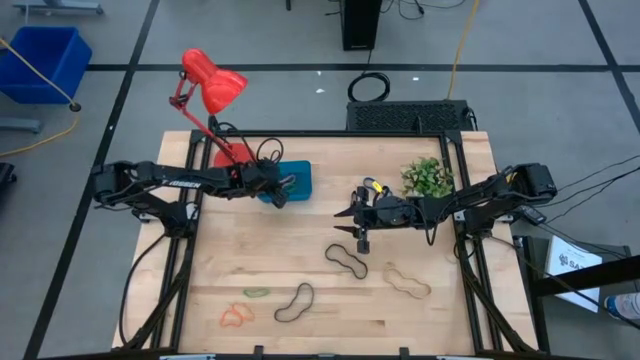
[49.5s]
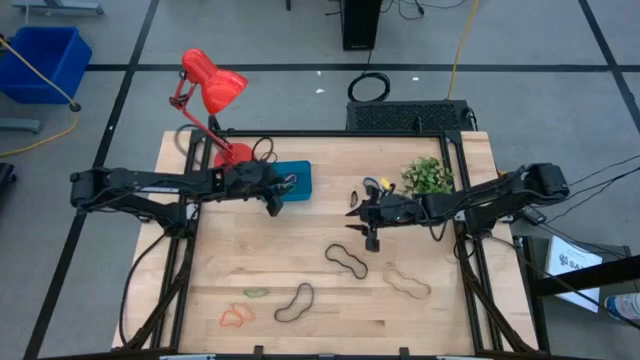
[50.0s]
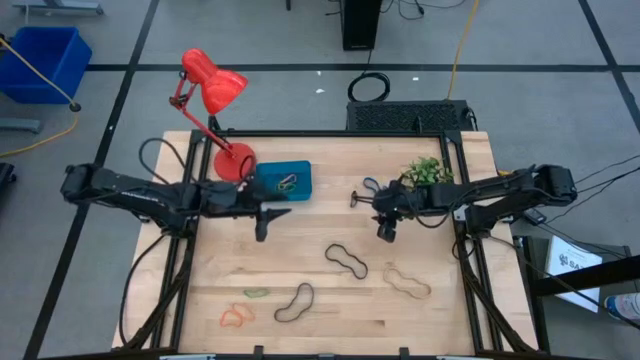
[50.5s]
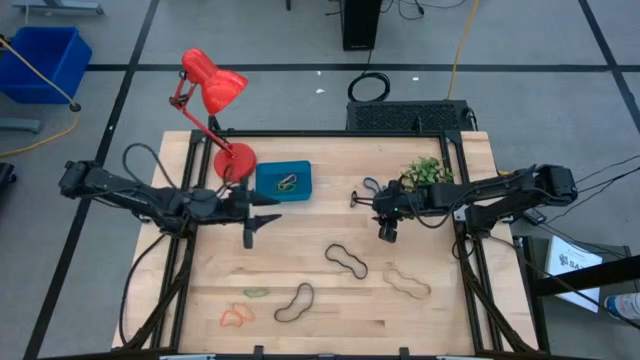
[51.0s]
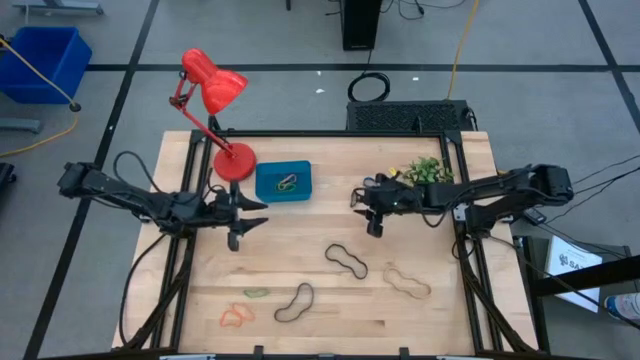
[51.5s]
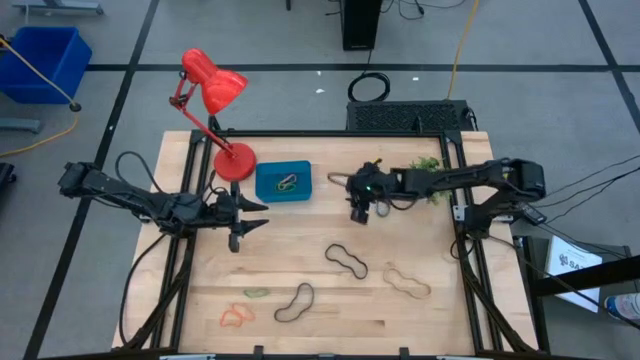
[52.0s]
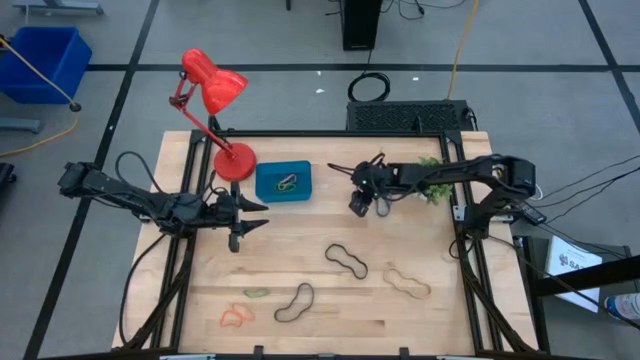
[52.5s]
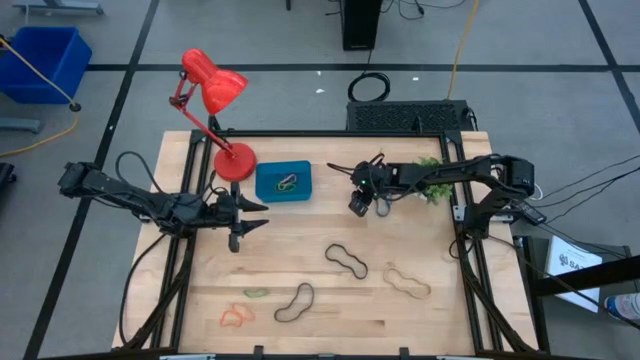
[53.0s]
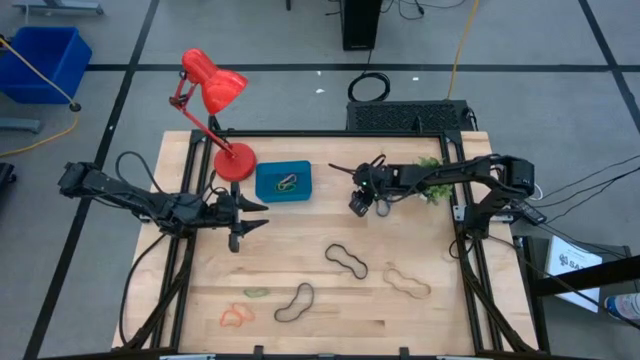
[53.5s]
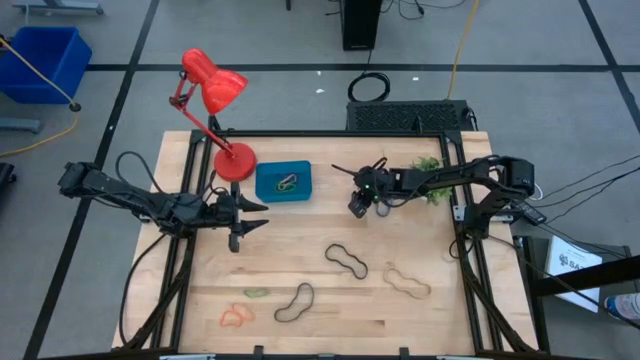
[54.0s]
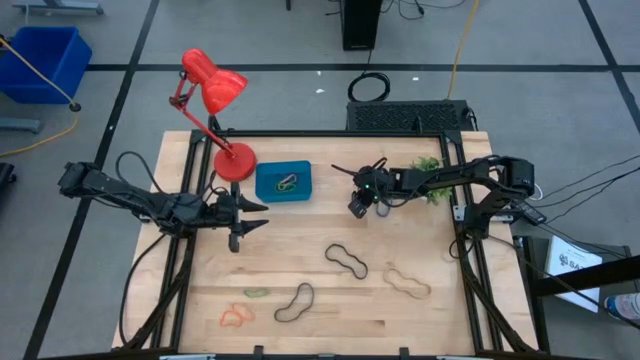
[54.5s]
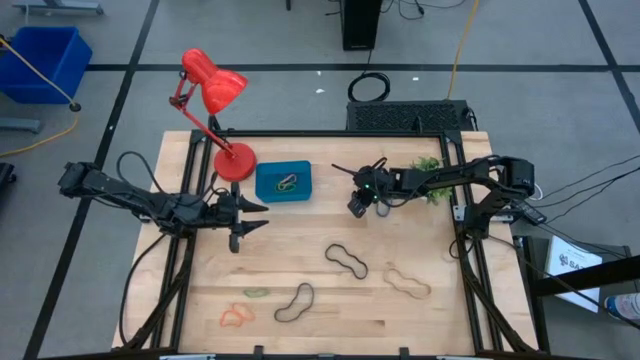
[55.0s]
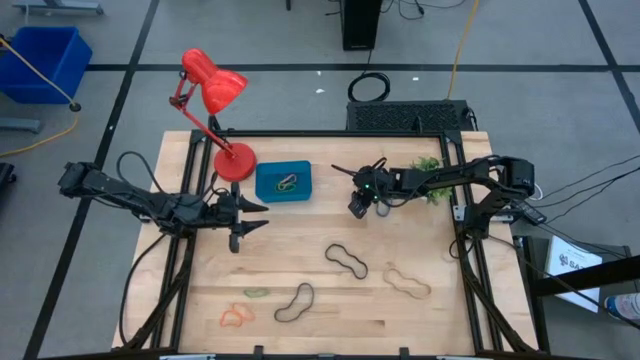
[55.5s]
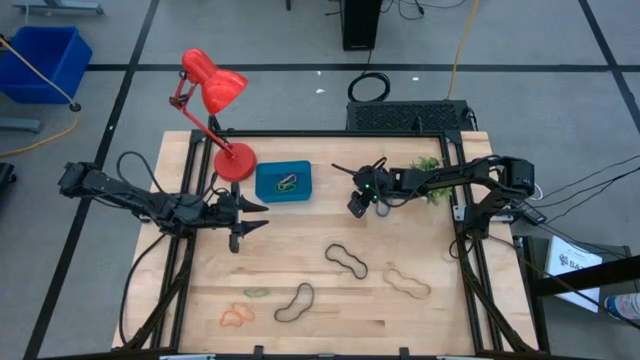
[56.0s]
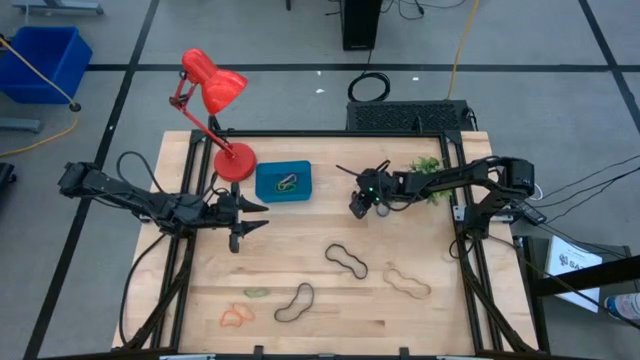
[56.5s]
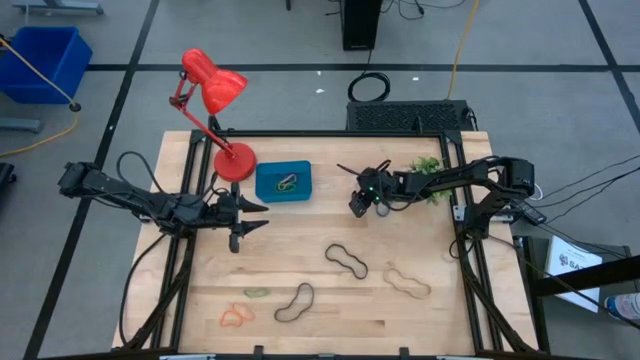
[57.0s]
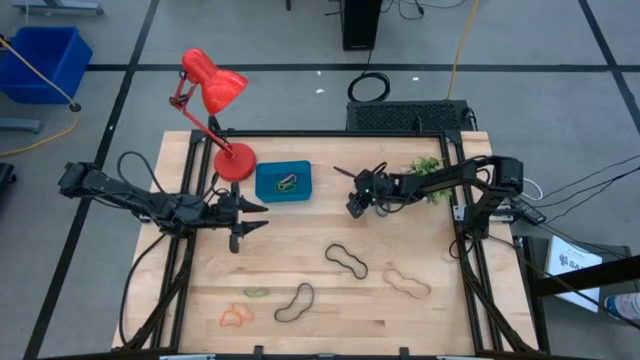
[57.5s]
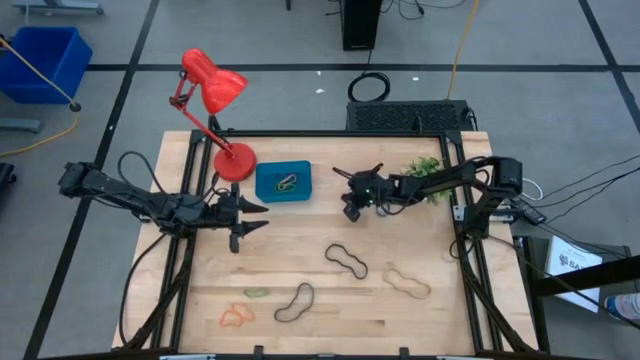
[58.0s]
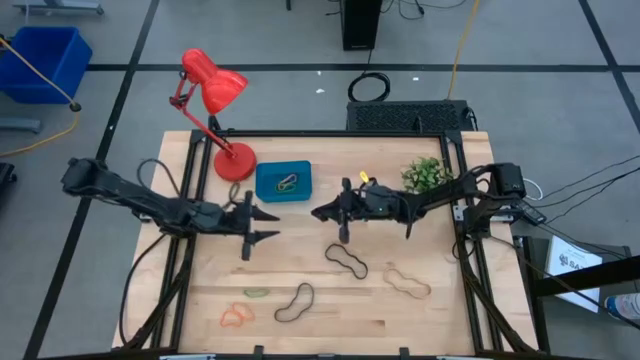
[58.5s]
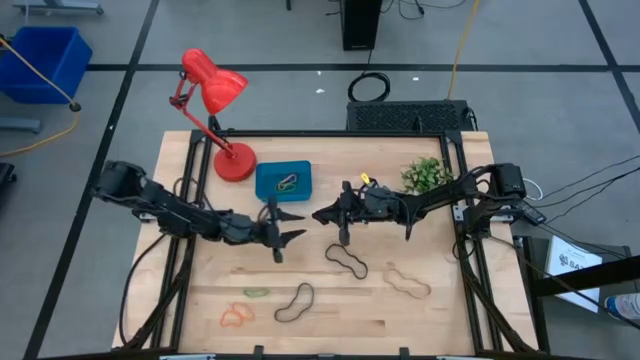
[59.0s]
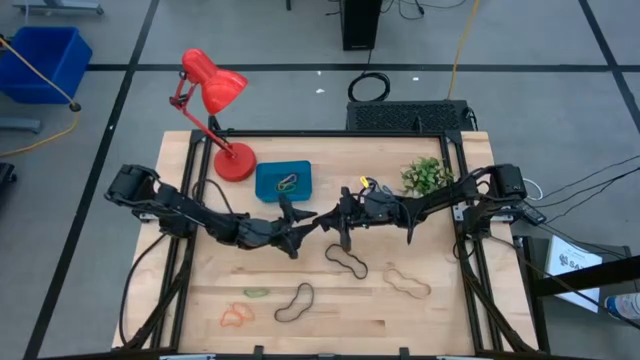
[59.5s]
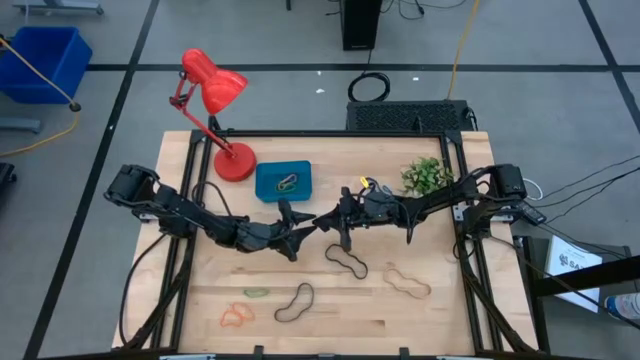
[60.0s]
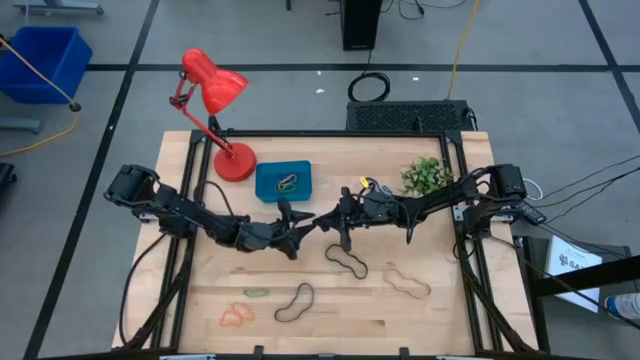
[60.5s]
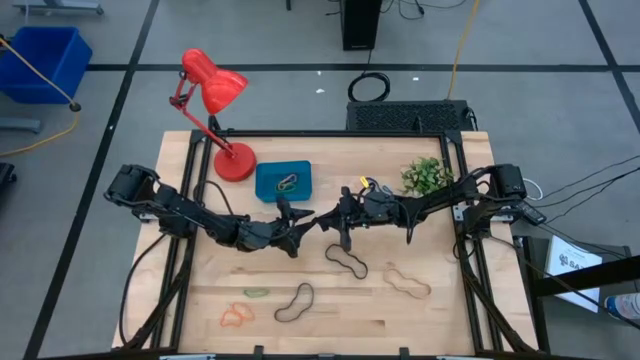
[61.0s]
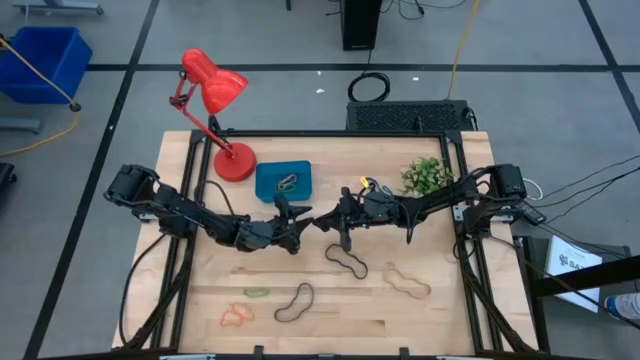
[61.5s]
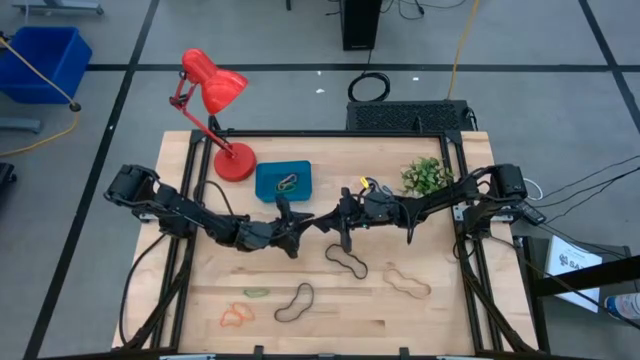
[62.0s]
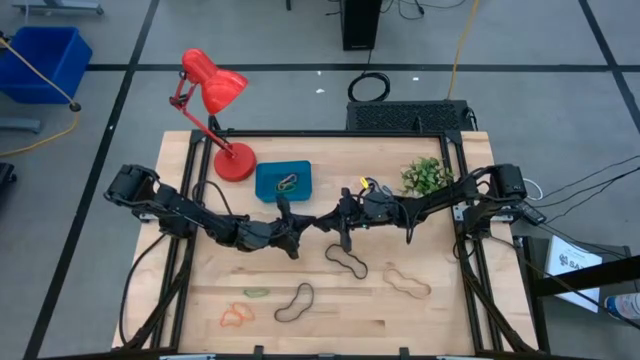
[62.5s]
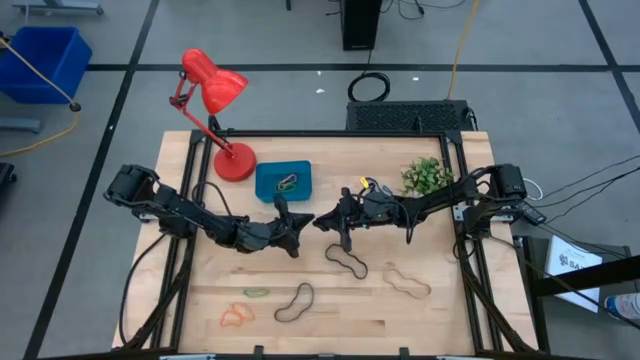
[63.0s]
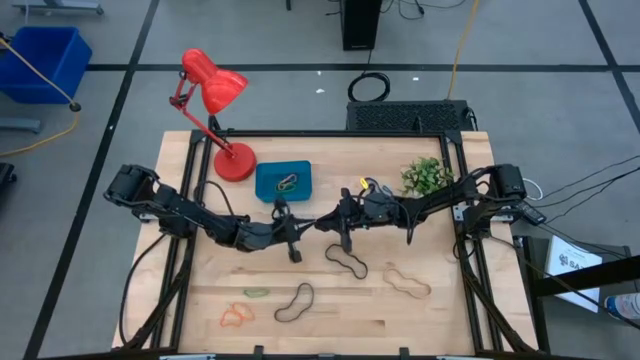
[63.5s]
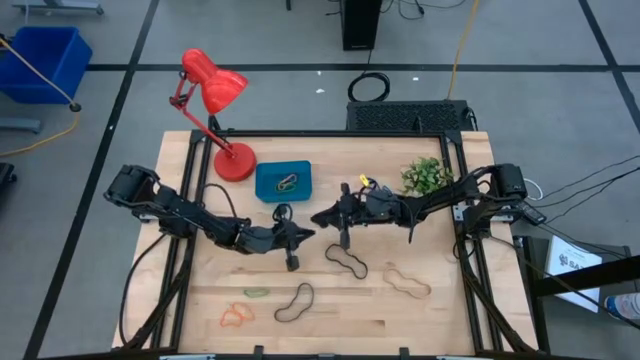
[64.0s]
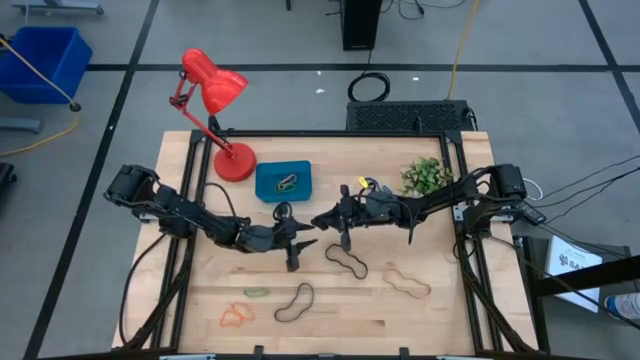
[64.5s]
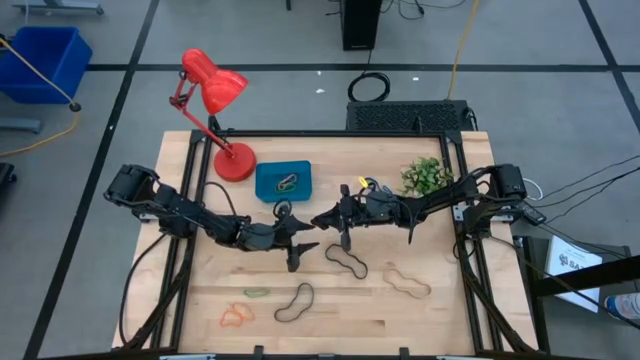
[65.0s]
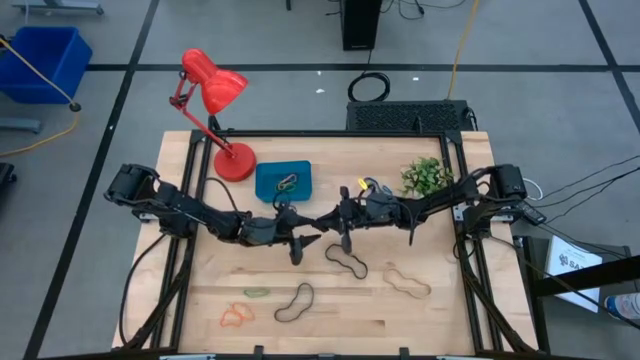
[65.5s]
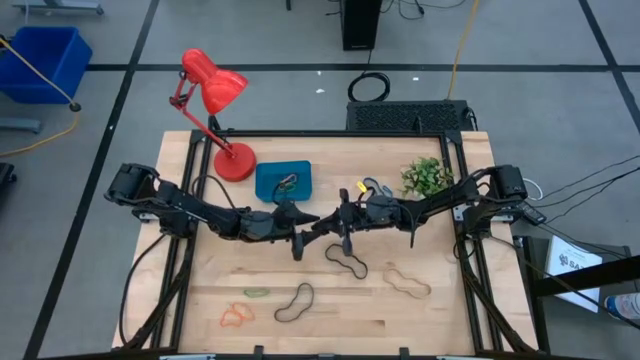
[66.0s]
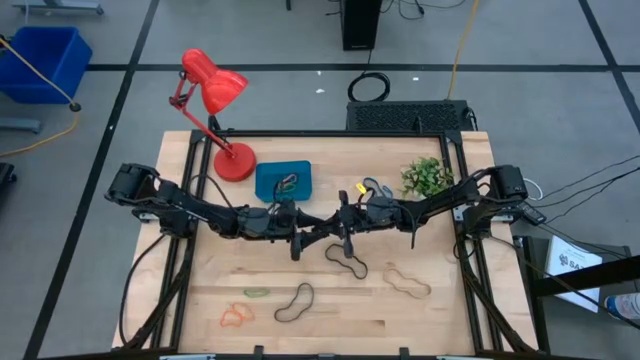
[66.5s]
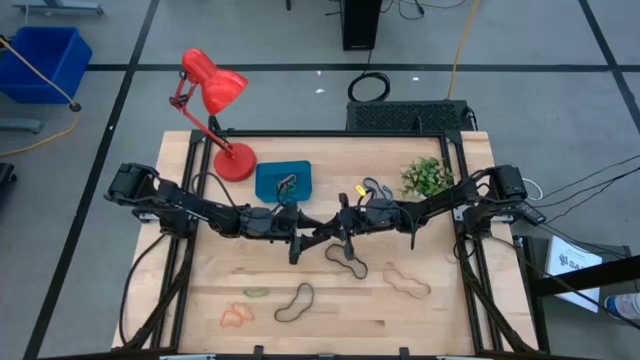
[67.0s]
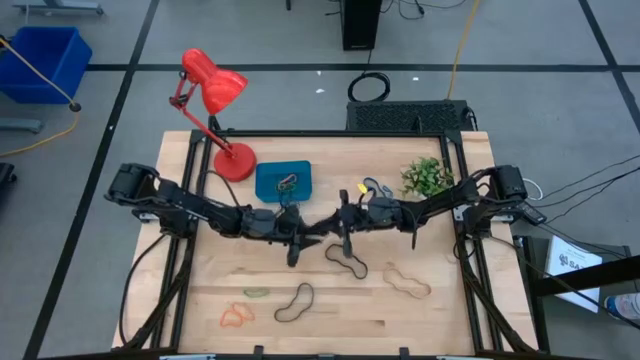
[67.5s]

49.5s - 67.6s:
Task: Pick and place rubber bands into bin
Put the black rubber band into the blue bin

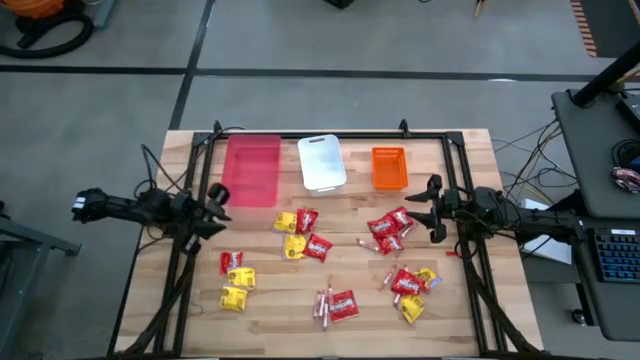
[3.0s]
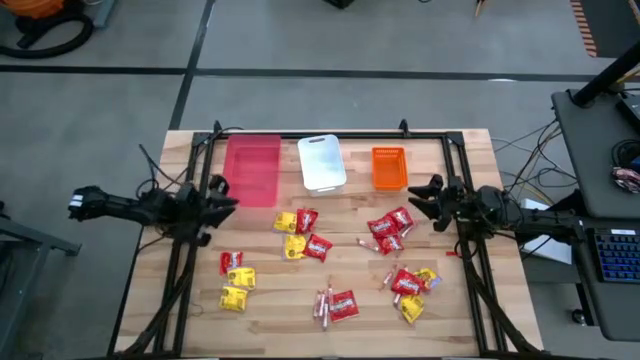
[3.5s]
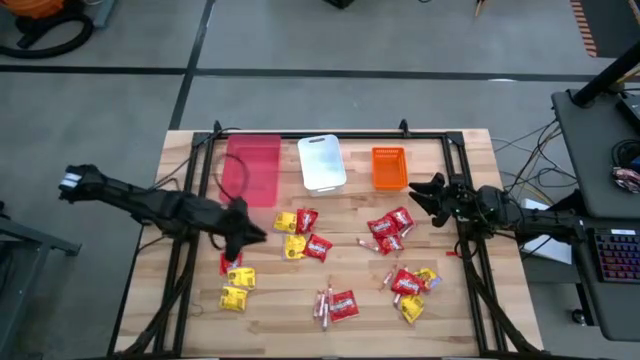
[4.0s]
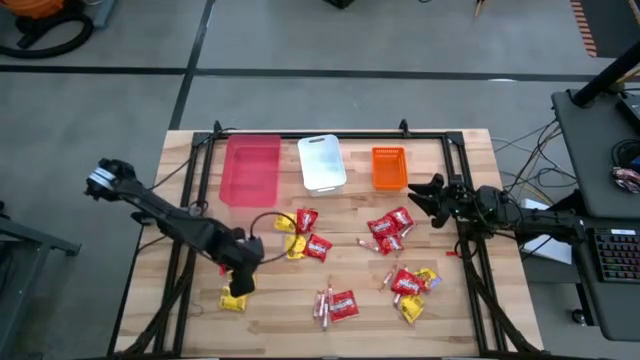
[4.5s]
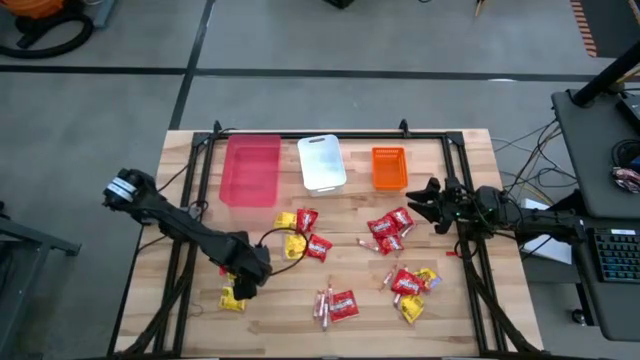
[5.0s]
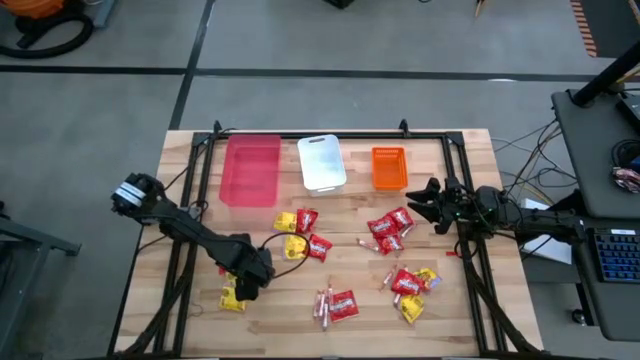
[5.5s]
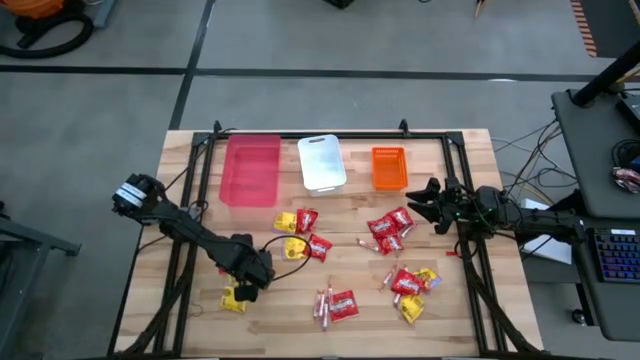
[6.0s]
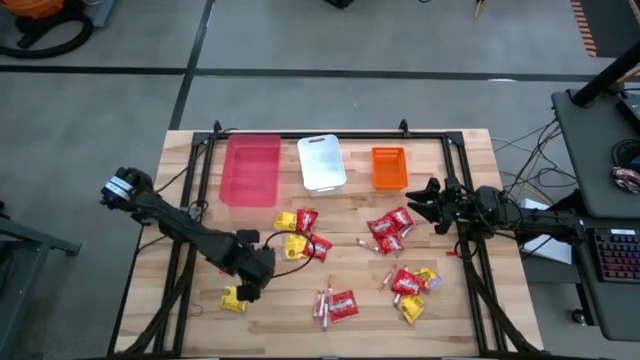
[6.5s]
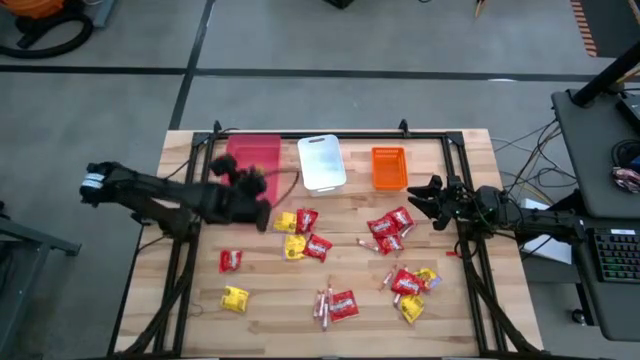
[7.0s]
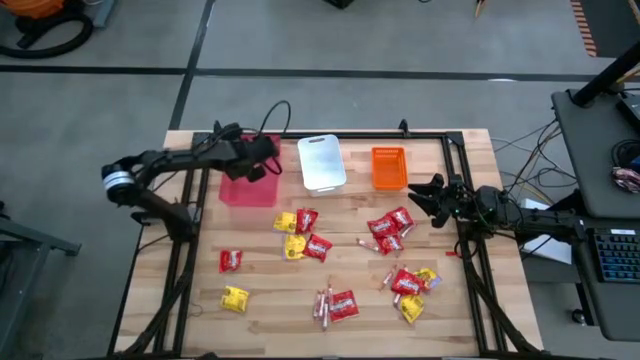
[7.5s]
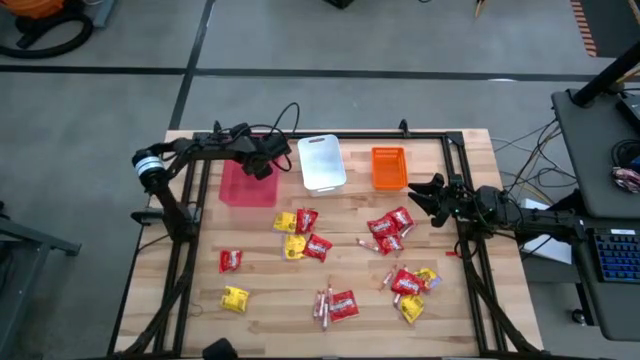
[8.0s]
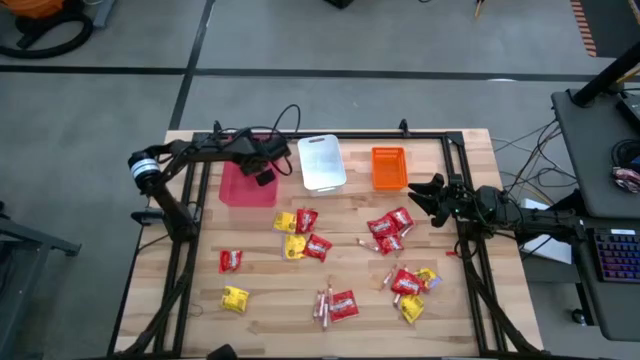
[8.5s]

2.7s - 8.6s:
Task: Sort candy
Put the yellow candy into the pink bin
